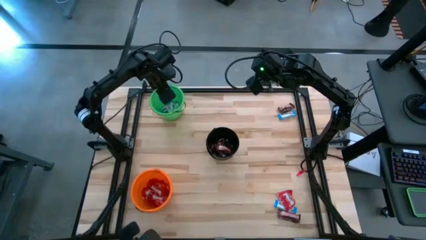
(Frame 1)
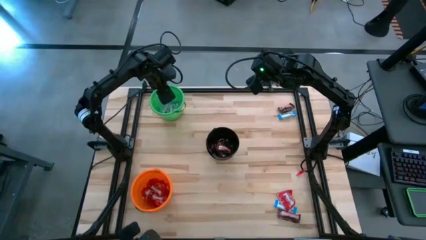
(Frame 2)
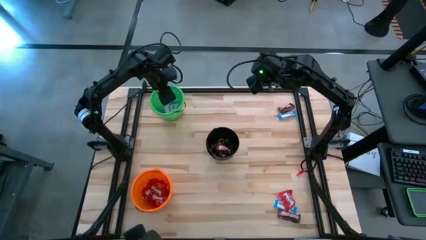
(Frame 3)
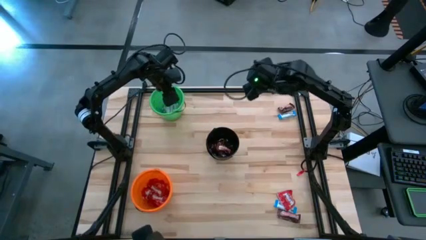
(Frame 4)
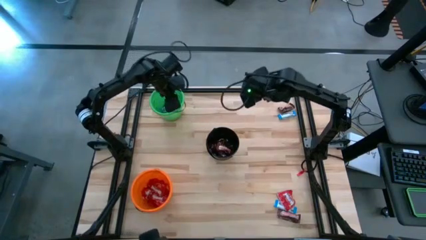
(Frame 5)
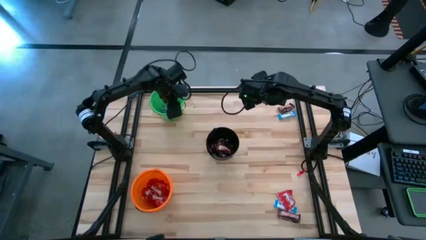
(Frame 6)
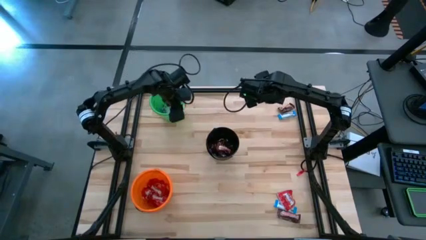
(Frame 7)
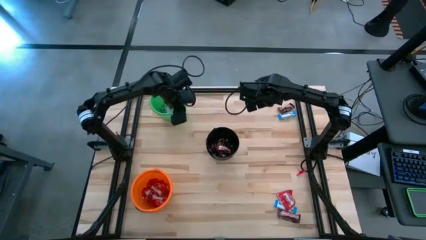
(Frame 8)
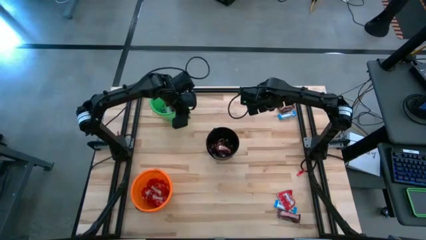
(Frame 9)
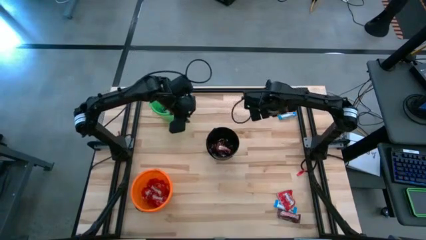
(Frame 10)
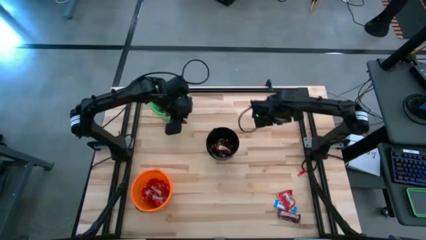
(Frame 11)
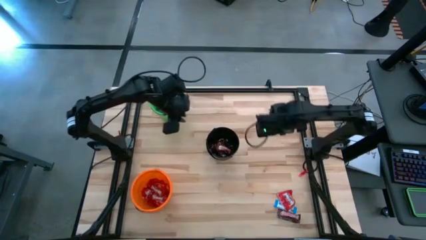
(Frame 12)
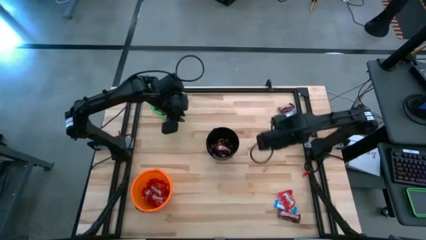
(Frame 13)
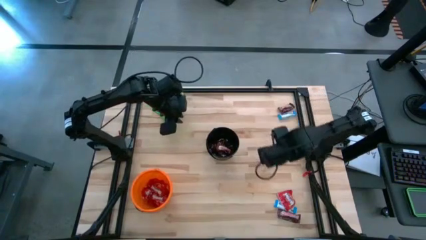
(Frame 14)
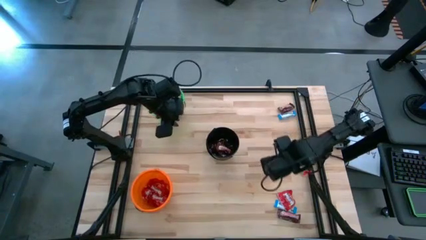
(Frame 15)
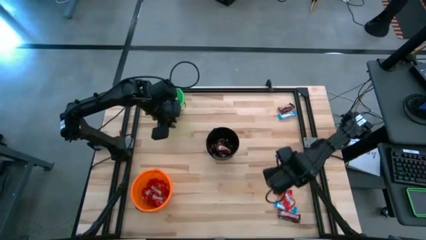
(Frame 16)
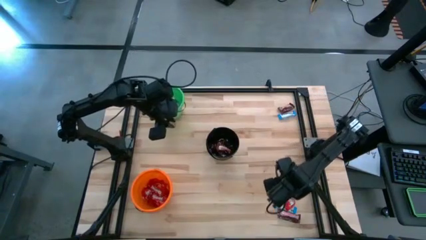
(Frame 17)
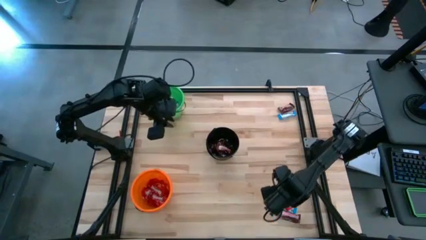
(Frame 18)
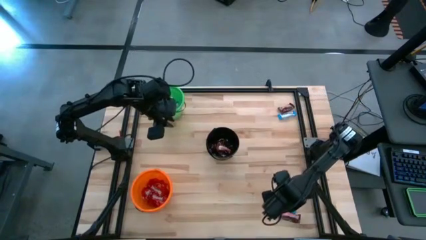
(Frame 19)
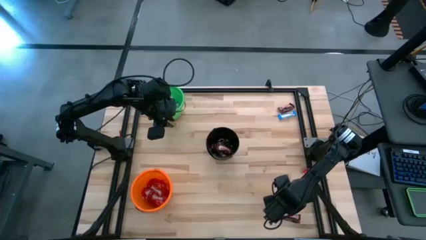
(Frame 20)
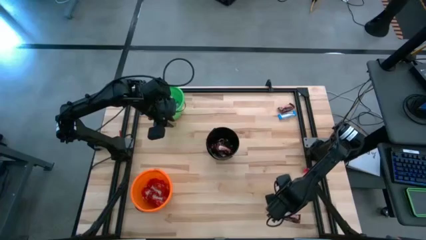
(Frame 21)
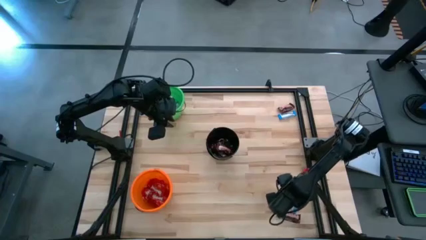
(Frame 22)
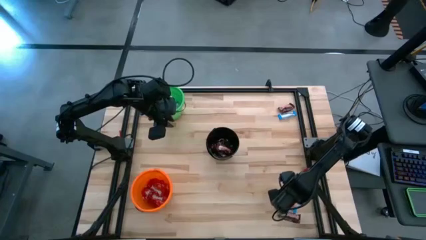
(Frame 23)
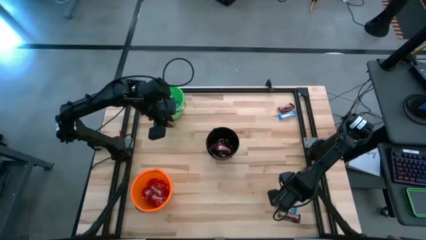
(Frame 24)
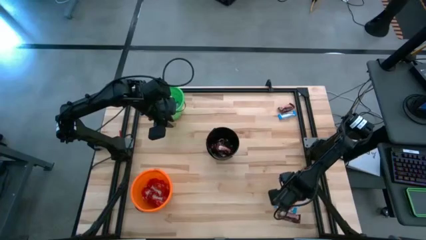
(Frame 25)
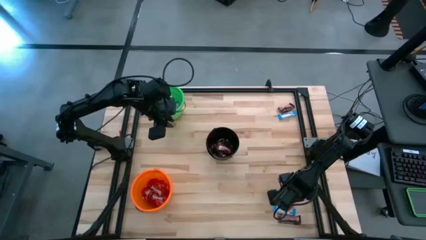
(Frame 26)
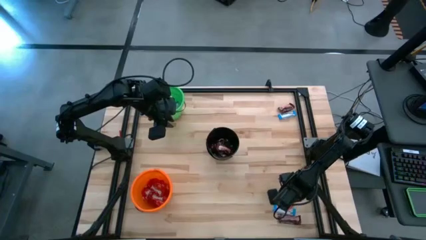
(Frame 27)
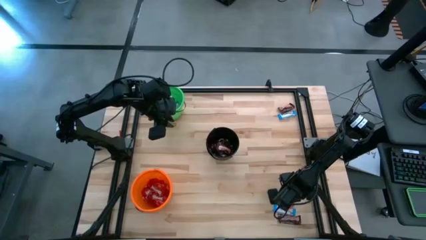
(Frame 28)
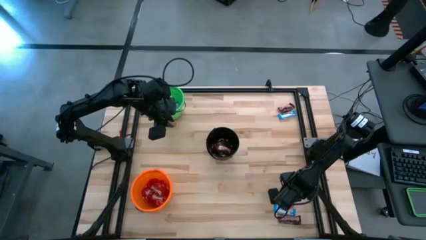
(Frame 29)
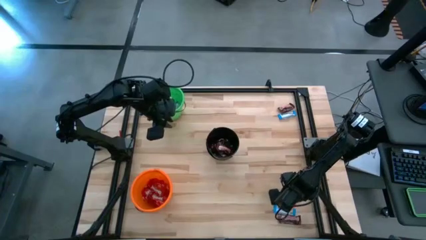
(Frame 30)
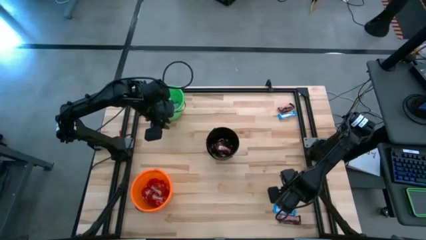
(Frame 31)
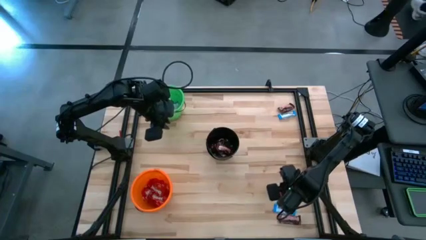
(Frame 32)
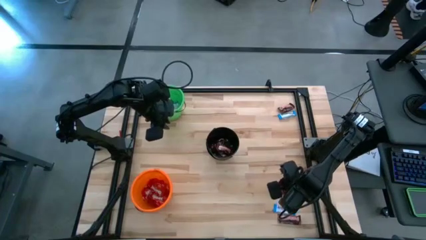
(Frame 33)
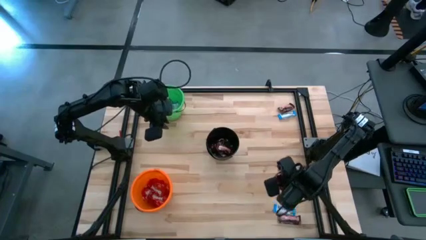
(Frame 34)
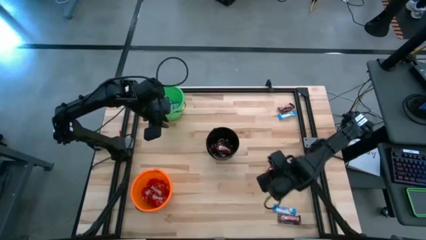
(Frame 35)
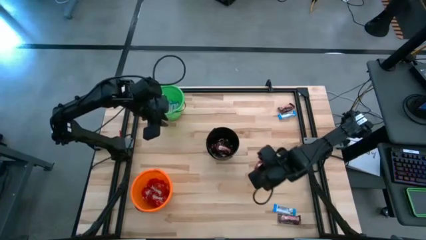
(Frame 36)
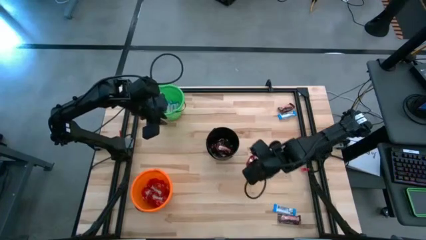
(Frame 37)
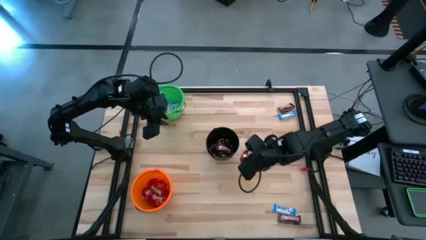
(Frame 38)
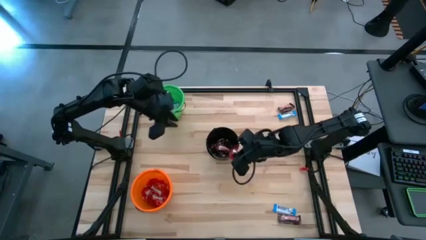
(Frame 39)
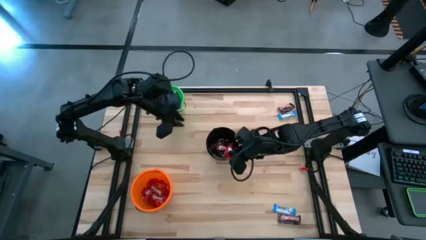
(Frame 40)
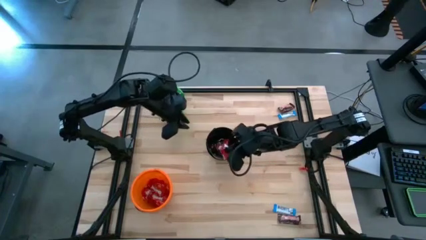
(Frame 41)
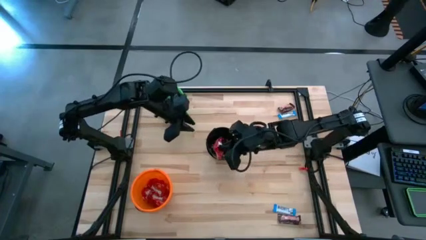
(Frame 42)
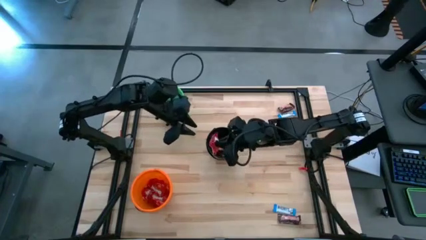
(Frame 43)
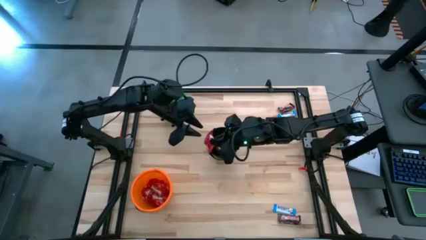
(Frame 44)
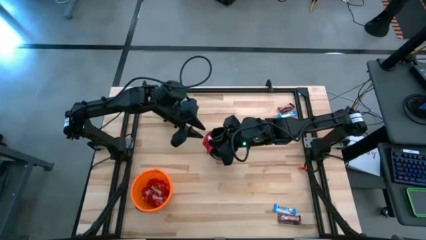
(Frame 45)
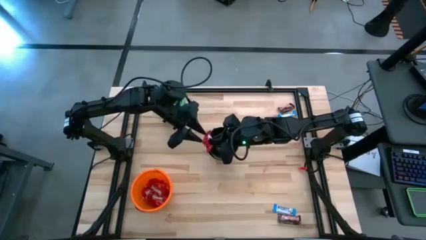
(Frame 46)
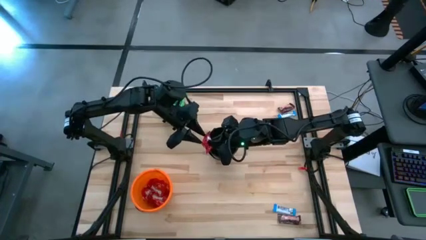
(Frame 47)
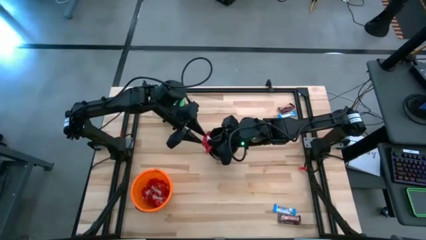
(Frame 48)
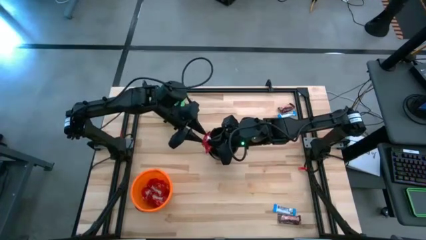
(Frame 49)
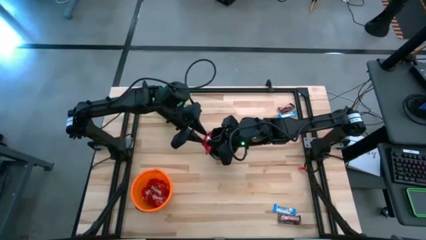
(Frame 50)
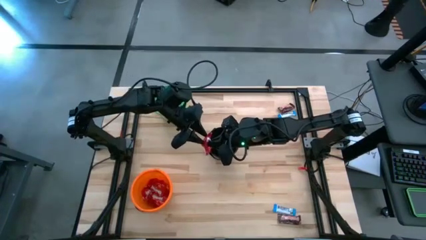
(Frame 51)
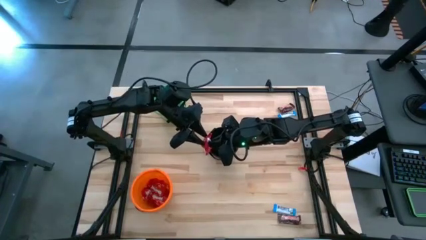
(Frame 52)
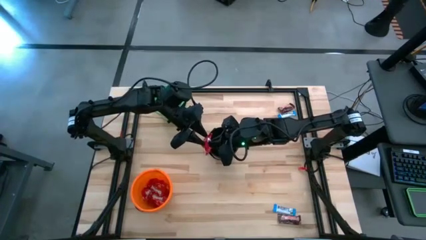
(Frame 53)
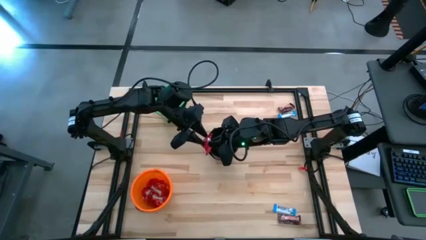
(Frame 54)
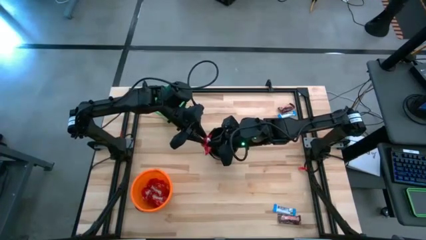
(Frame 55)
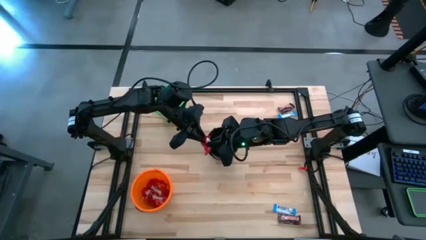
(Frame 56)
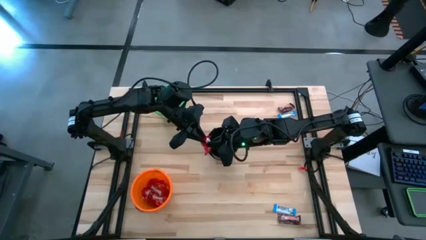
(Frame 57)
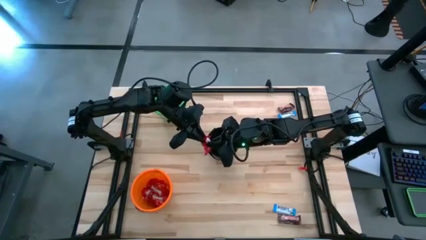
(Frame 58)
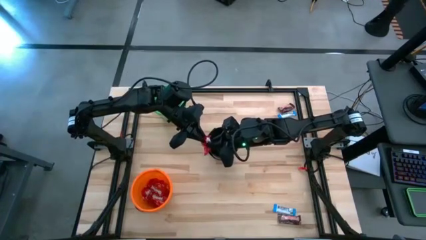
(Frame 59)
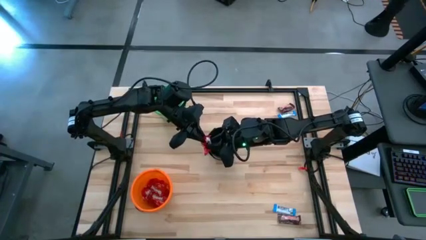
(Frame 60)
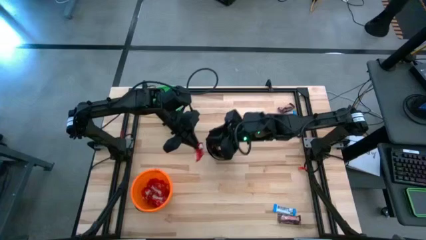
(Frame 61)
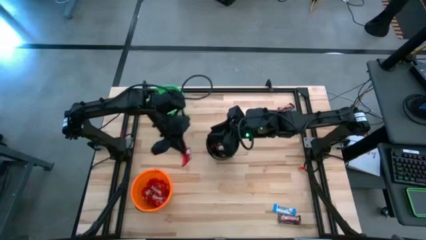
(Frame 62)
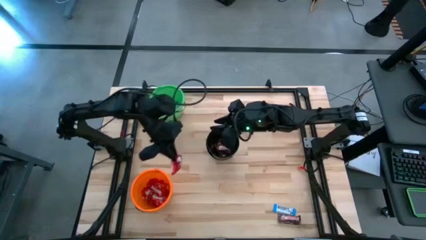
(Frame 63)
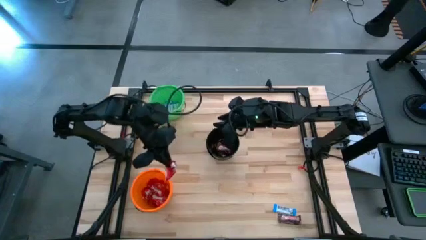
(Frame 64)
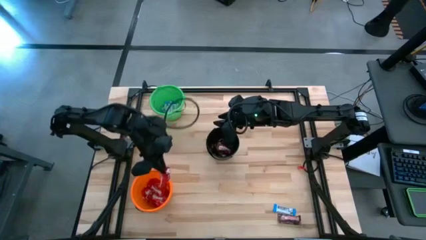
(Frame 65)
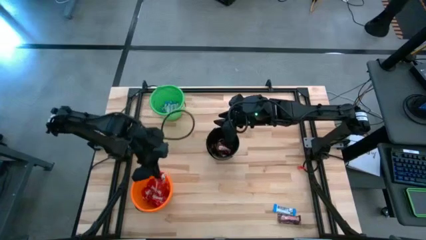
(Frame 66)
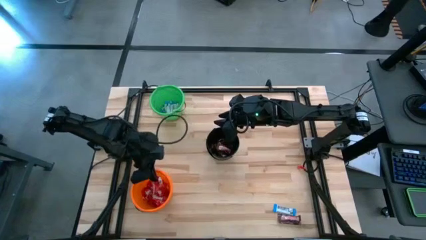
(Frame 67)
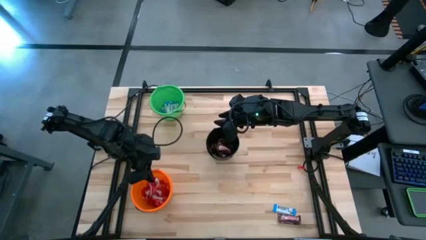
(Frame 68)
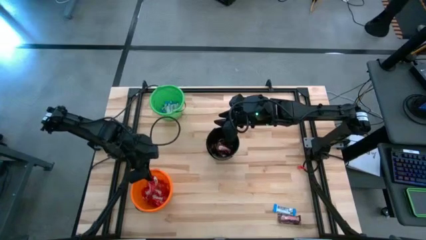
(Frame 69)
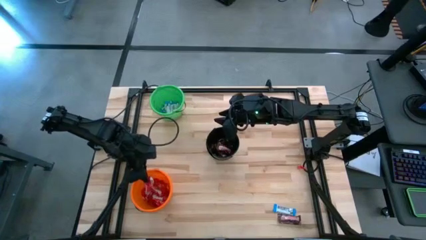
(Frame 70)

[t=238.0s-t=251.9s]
Task: Sort candy
Put the red candy pack into the orange bucket

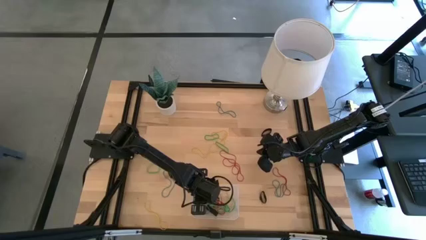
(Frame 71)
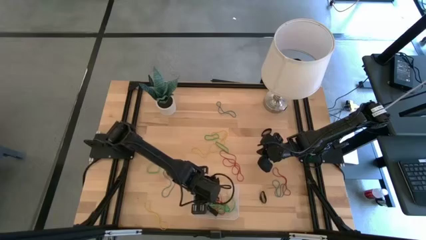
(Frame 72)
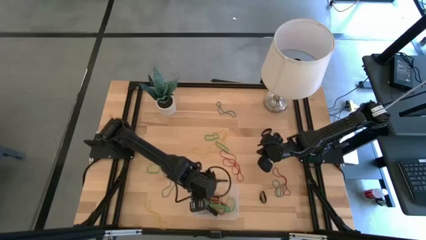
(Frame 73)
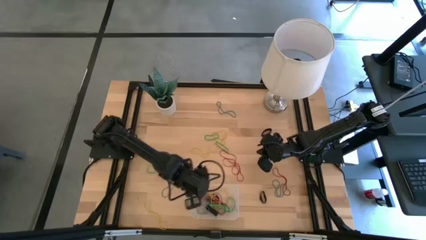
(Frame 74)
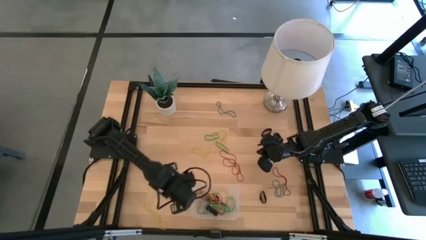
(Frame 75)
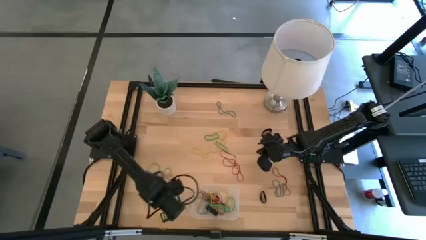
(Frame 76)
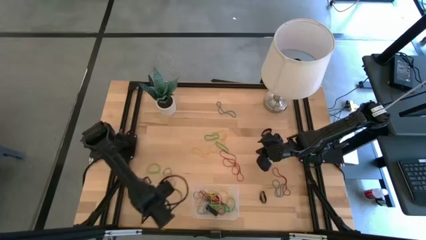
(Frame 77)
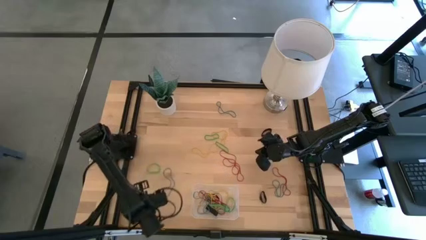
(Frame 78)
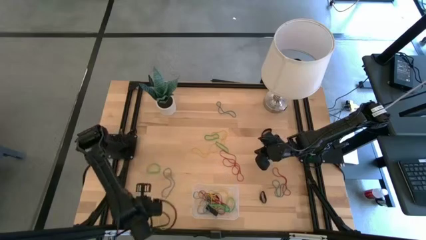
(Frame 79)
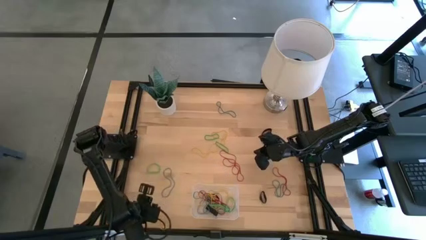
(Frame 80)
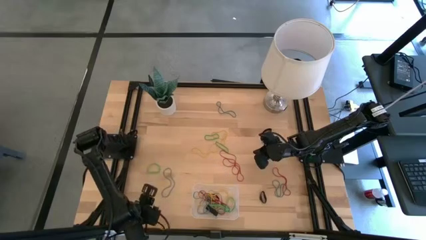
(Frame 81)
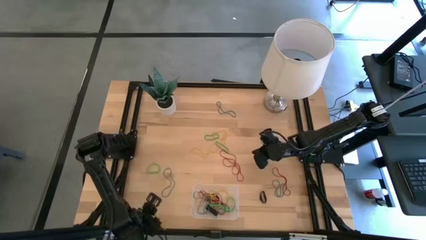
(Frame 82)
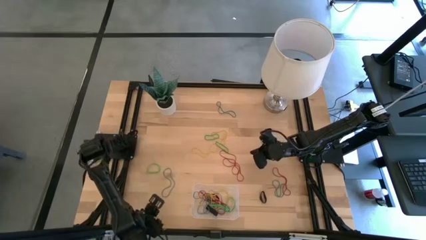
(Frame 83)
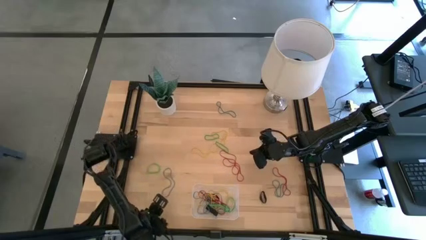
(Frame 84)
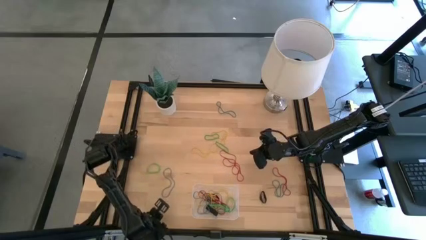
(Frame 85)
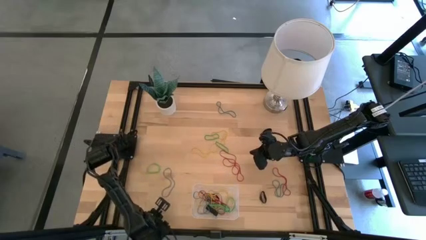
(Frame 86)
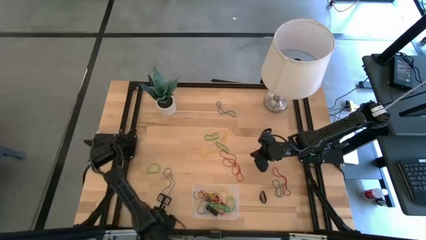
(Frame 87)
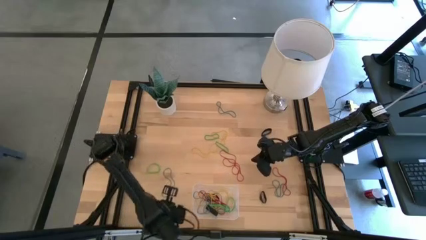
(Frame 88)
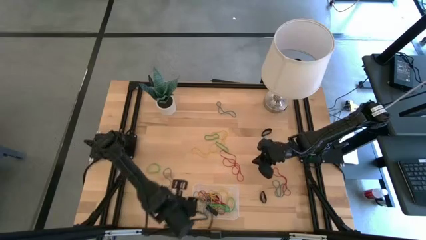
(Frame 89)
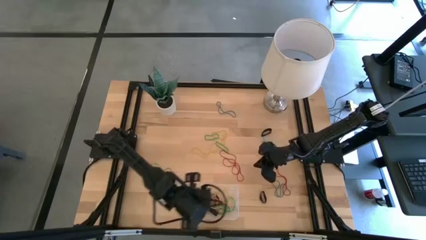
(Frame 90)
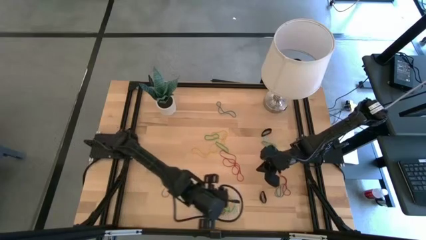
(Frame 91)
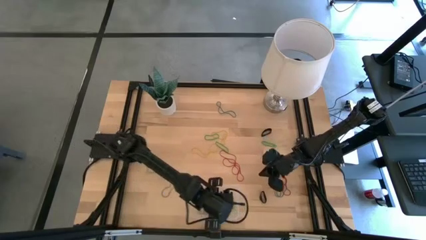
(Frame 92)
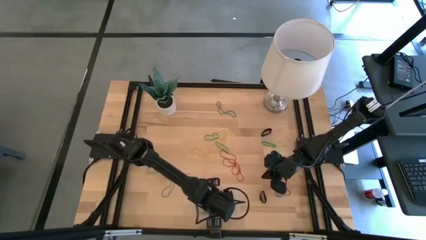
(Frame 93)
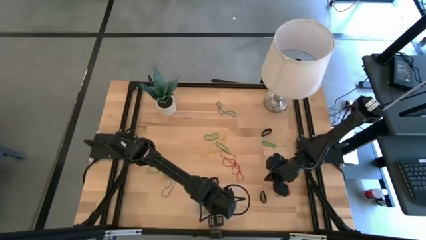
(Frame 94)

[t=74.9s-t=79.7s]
Task: Pick and place rubber bands into bin
Put the yellow rubber band into the transparent bin
